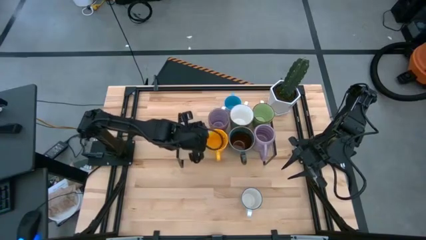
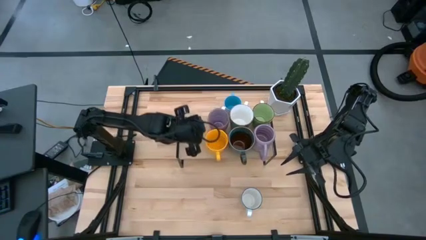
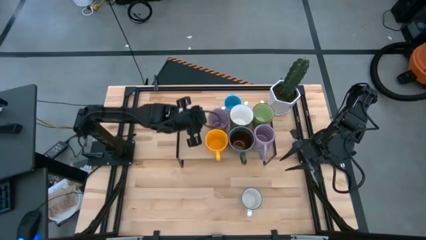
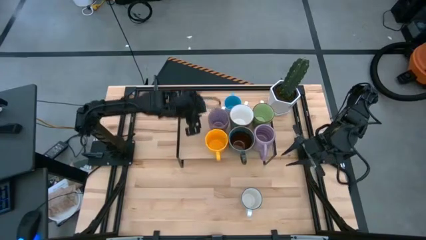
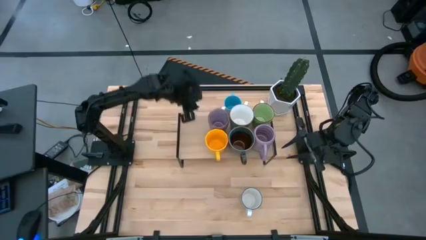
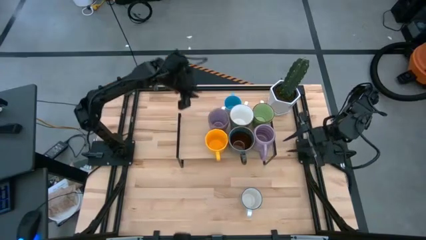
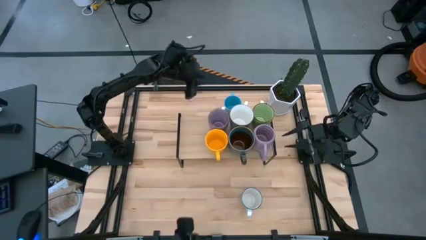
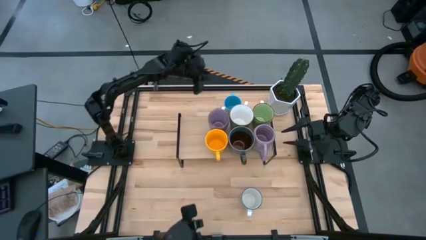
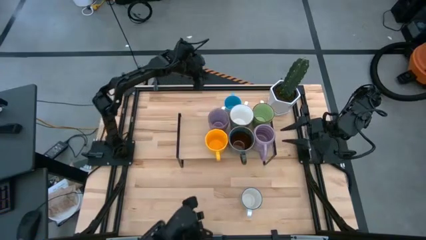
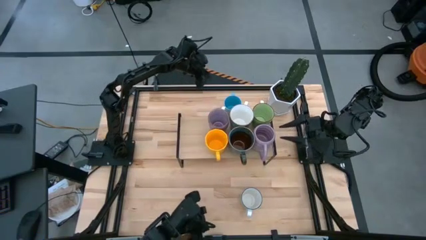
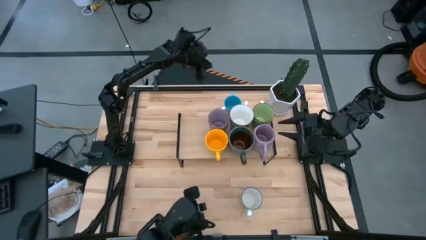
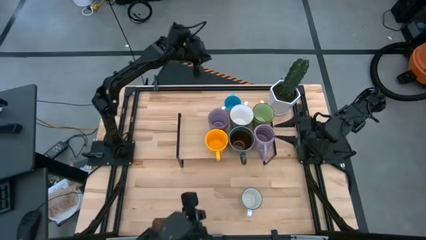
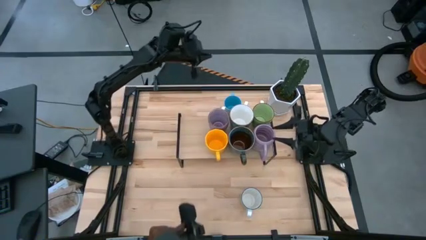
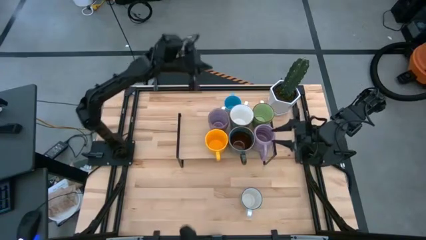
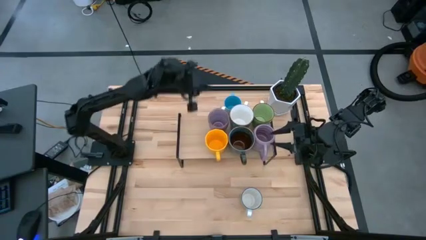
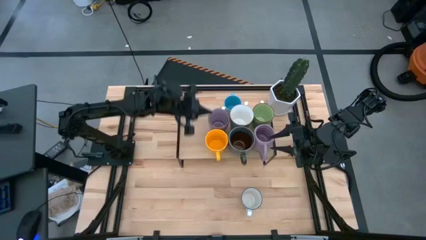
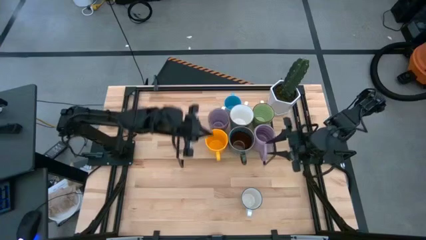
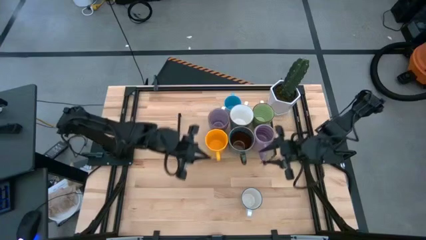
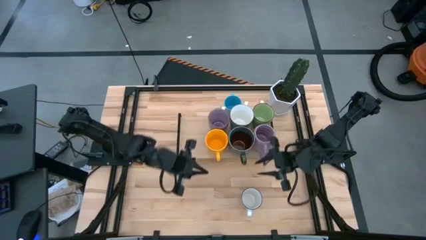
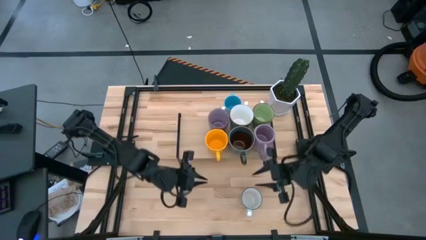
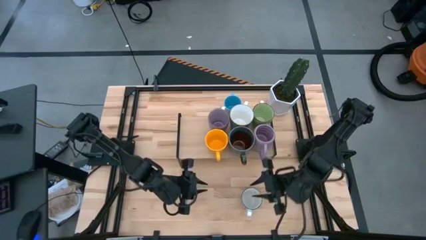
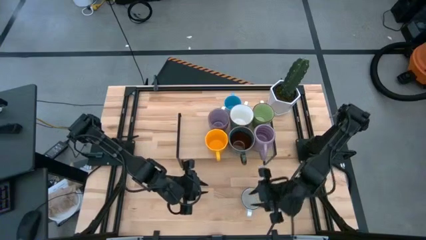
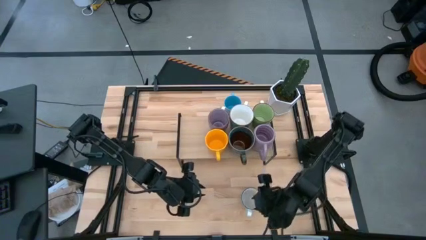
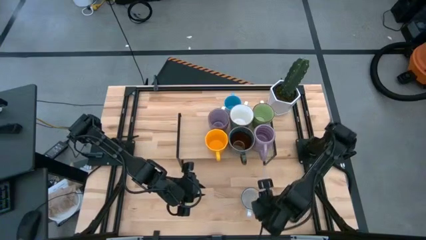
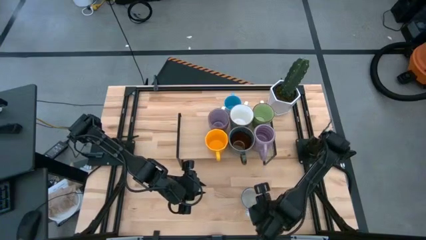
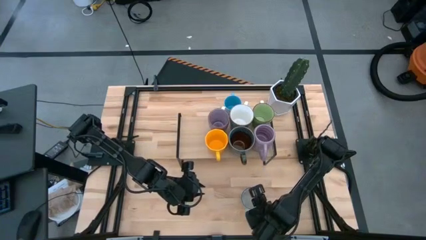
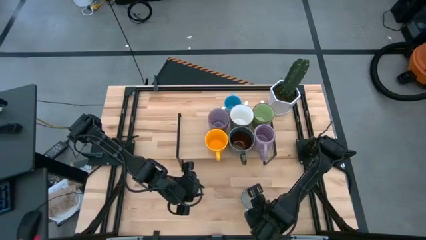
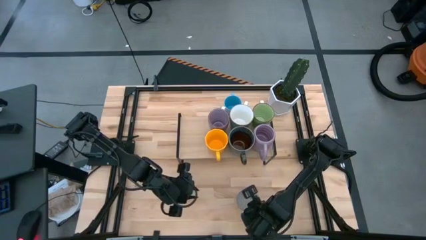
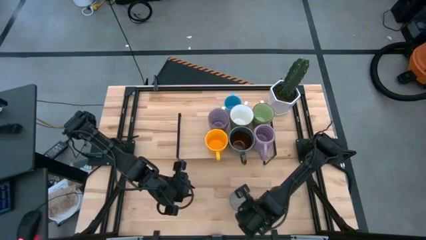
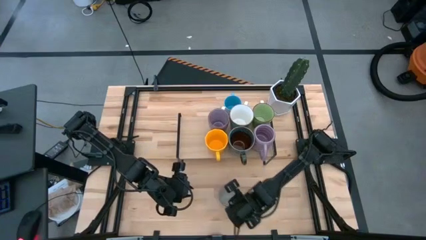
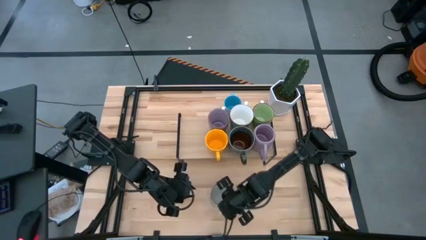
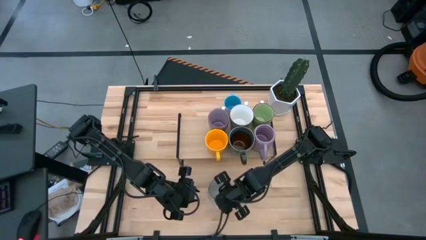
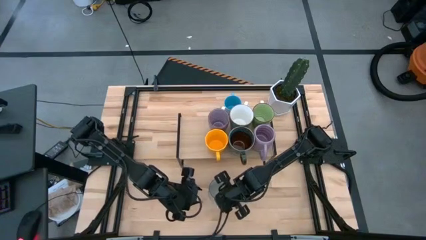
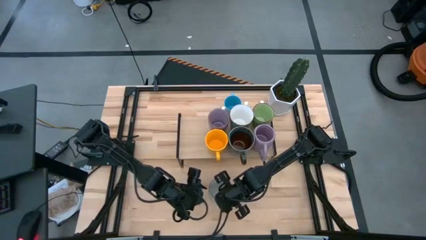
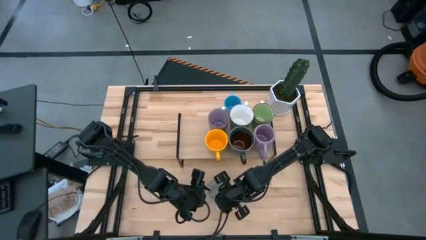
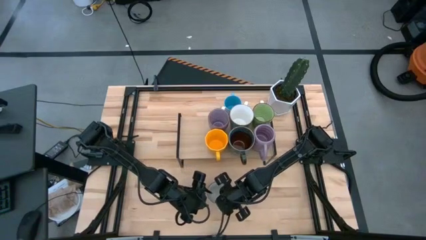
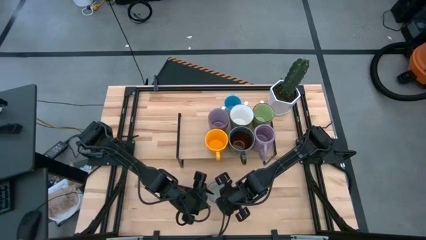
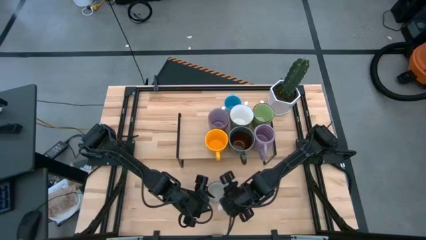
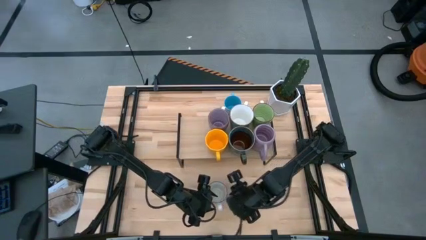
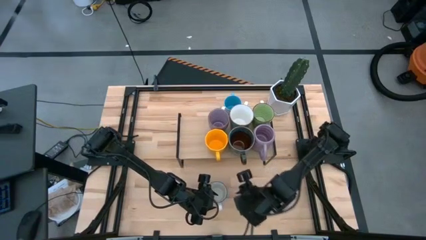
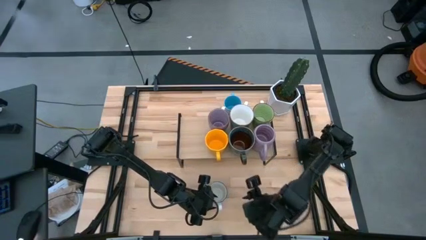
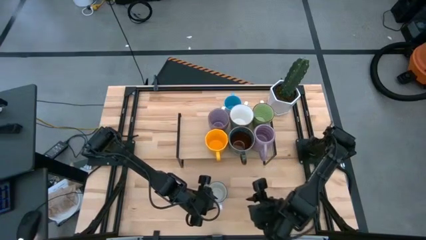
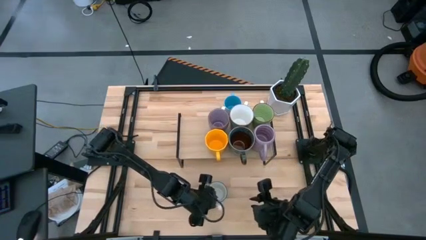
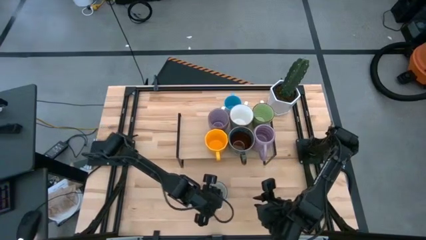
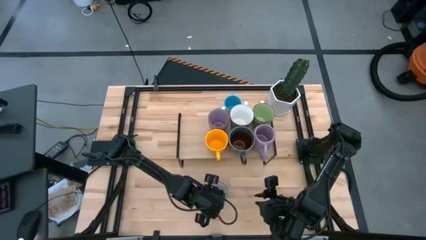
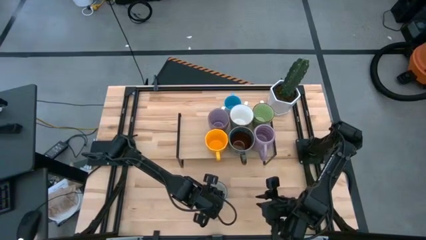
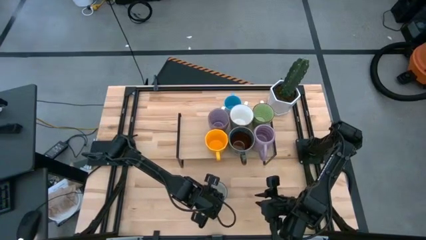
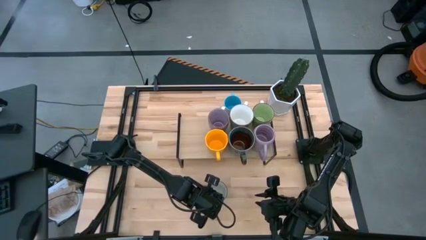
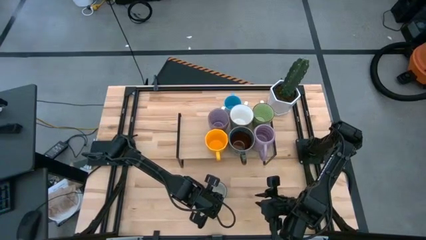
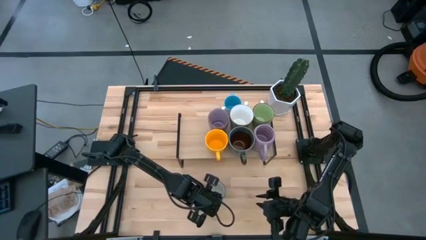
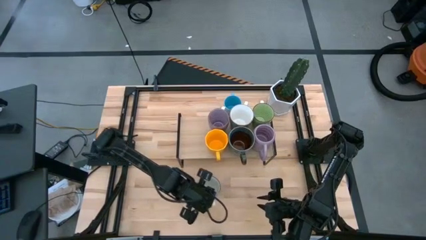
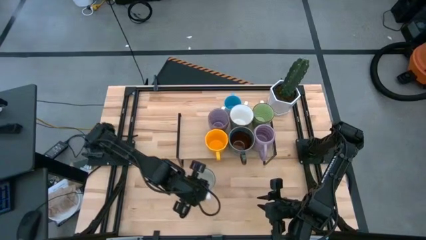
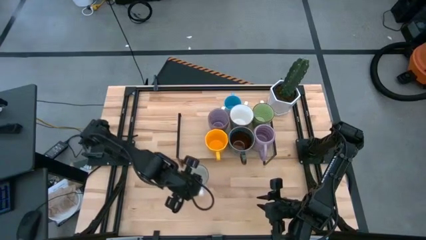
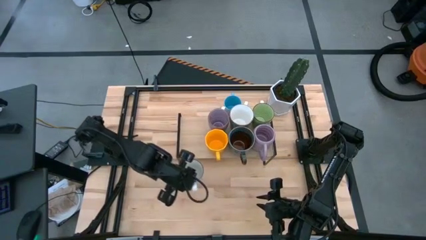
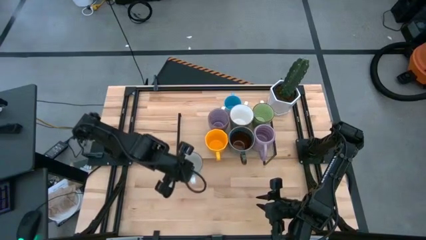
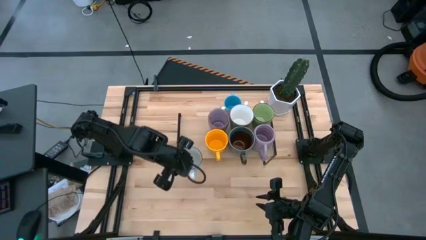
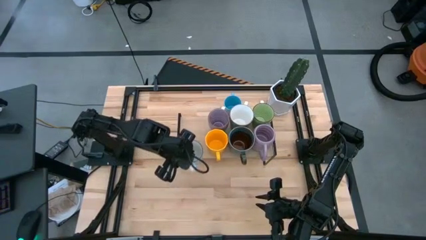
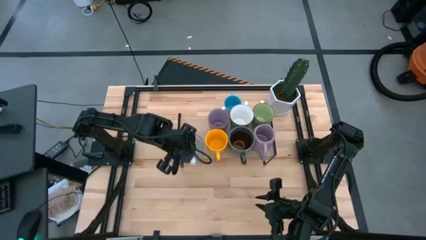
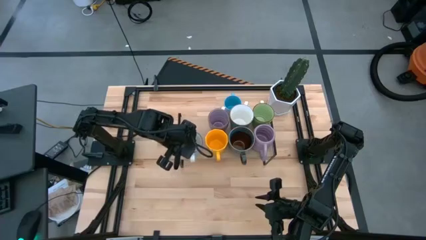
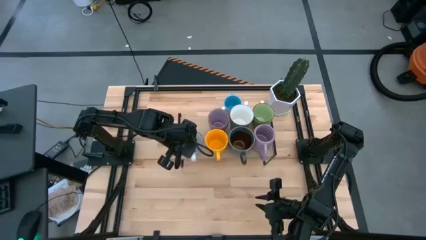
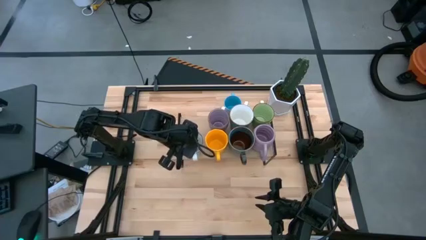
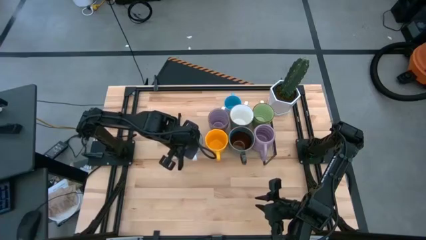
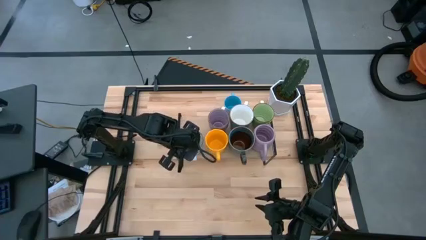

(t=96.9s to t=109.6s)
Task: Place coffee mugs
Put the patterned blue mug on the shelf

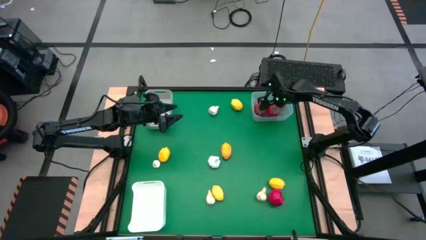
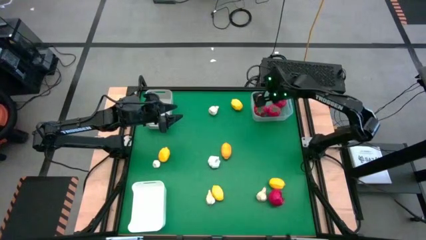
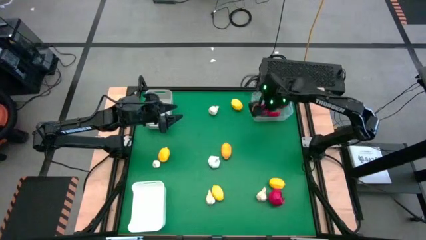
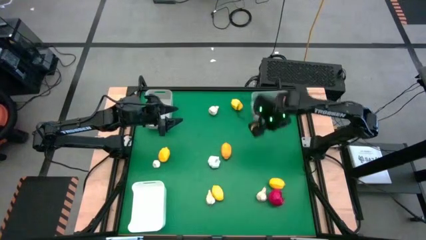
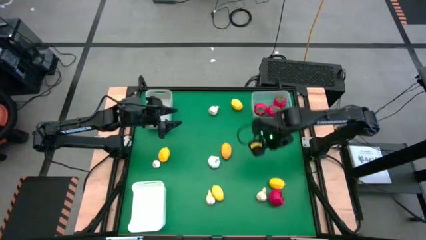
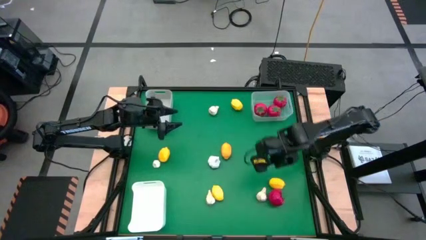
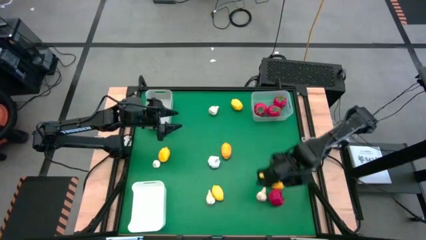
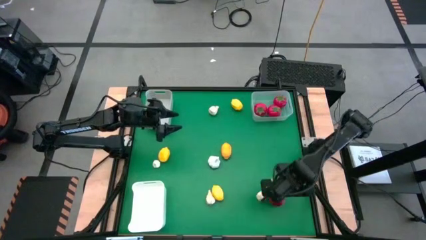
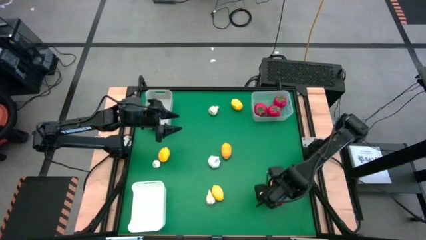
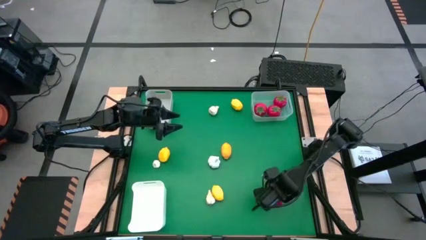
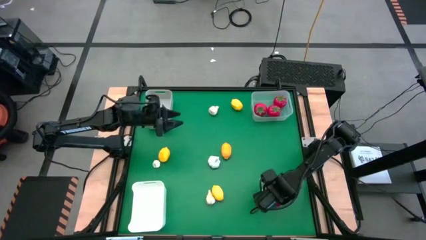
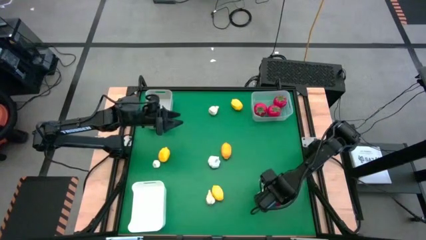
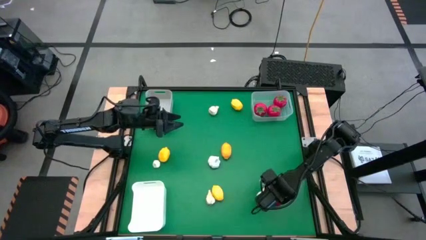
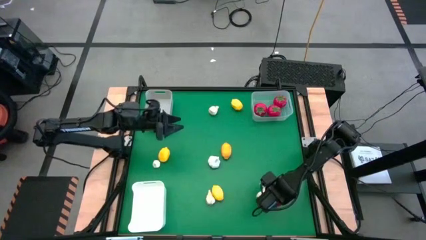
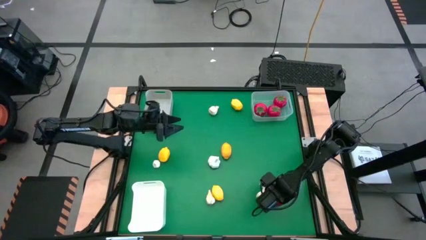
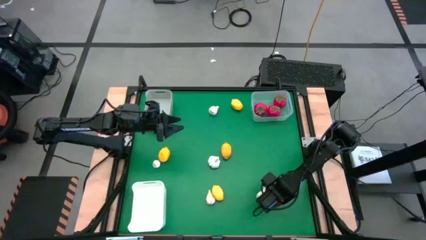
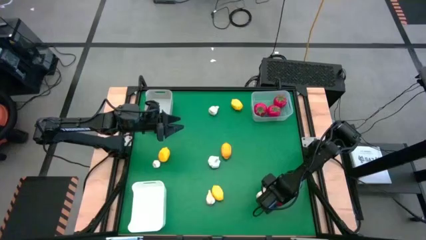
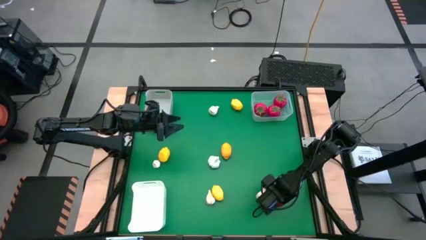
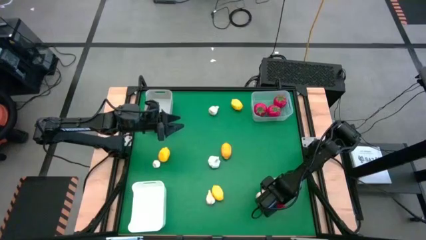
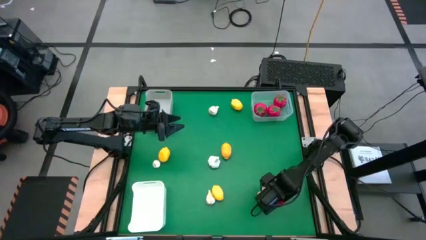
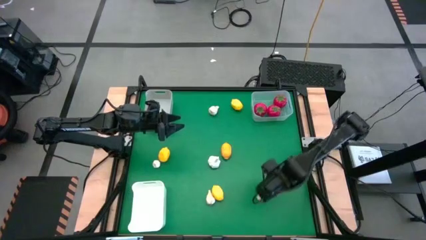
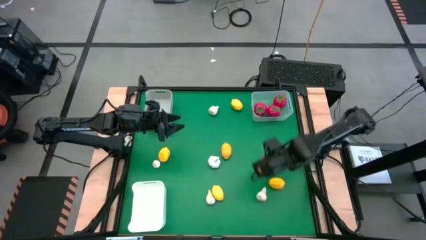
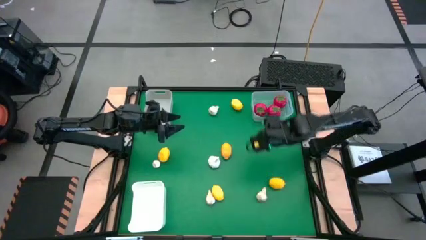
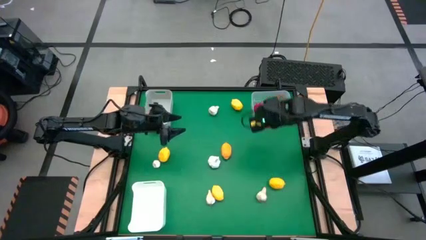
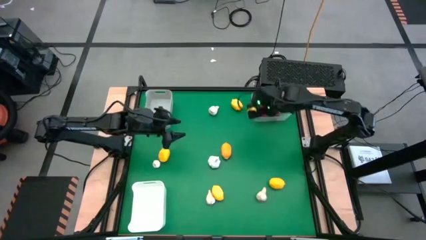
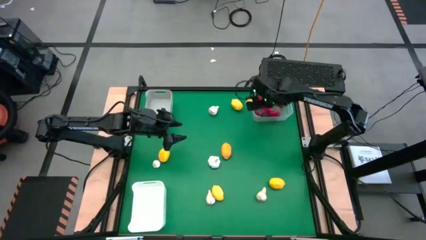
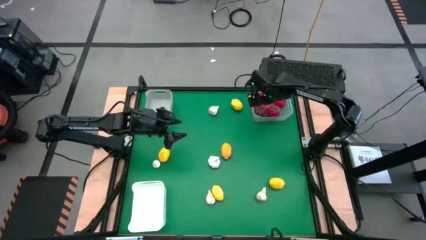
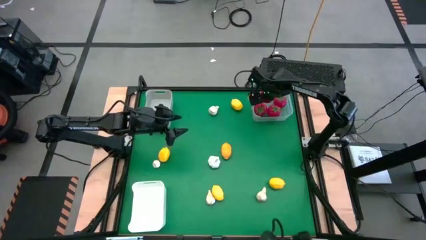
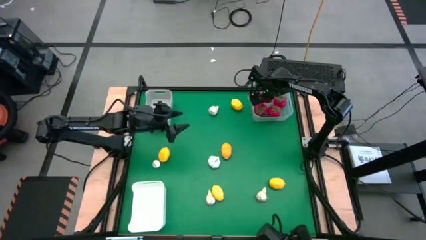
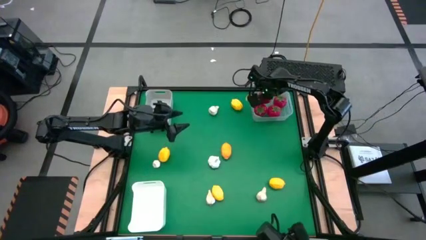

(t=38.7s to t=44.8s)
Task: Sort produce into baskets
Put the tomato into the transparent bin
